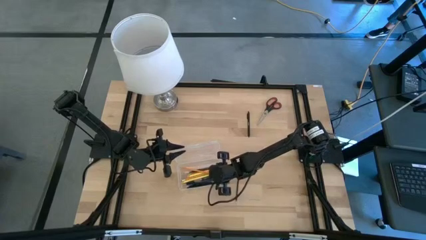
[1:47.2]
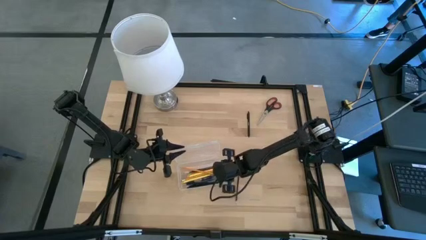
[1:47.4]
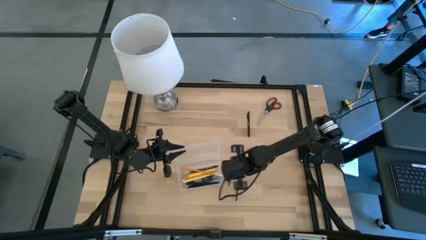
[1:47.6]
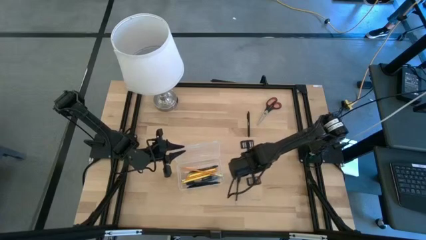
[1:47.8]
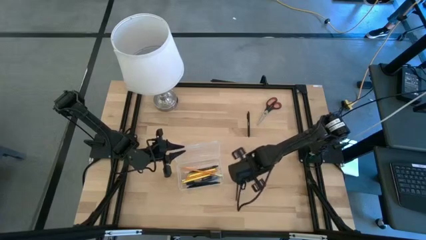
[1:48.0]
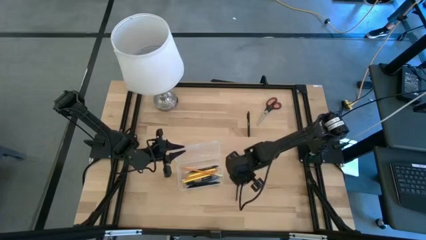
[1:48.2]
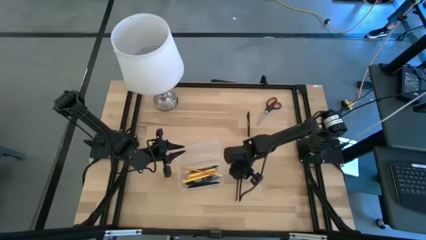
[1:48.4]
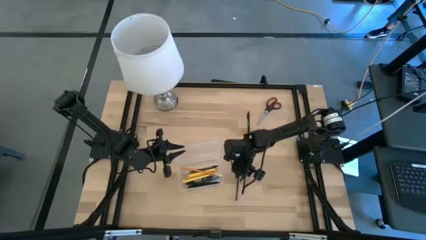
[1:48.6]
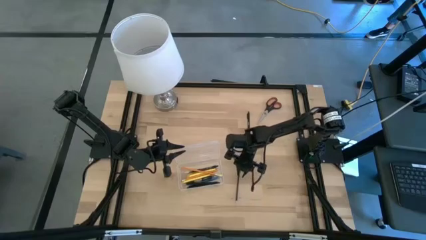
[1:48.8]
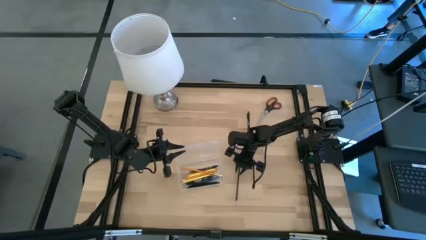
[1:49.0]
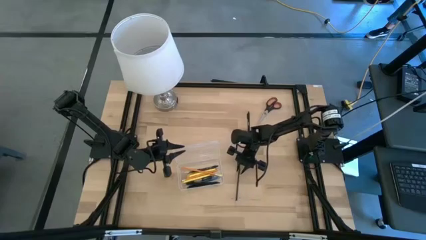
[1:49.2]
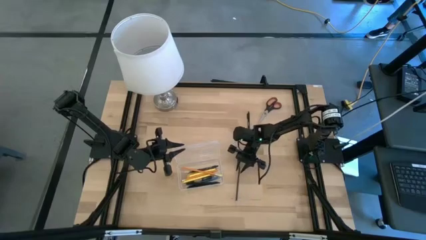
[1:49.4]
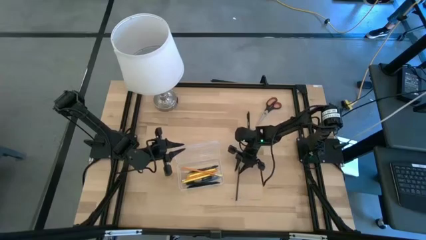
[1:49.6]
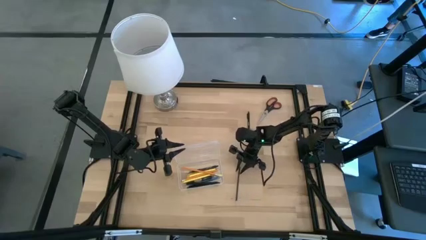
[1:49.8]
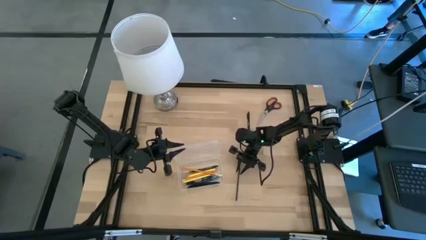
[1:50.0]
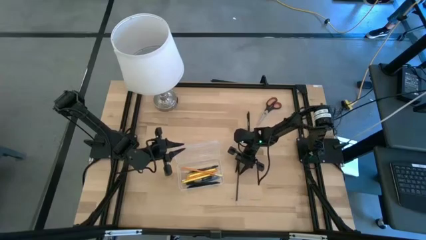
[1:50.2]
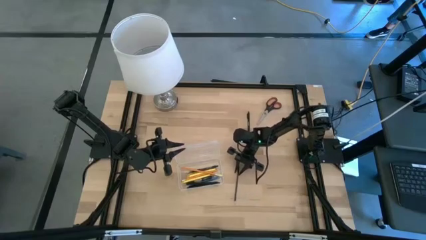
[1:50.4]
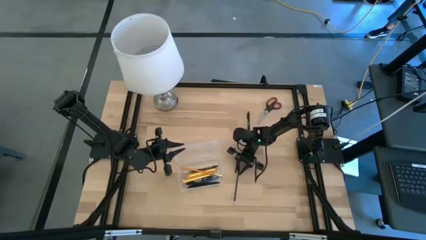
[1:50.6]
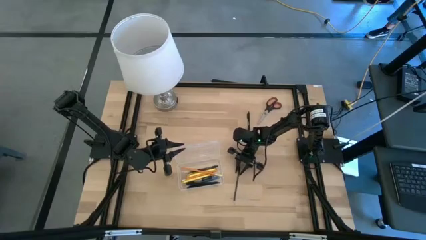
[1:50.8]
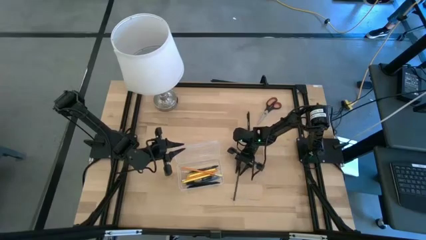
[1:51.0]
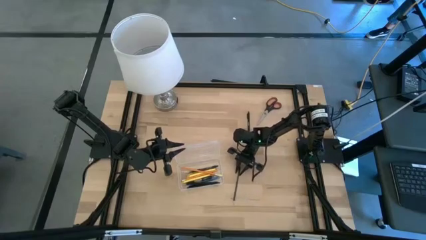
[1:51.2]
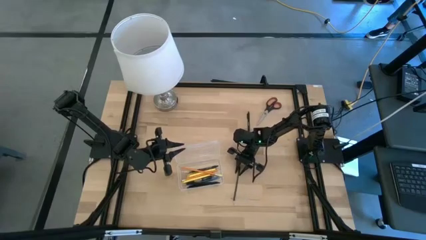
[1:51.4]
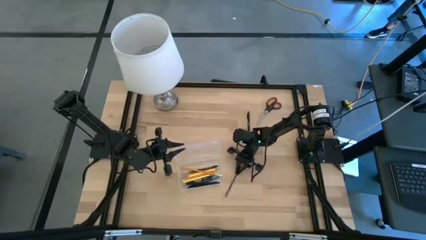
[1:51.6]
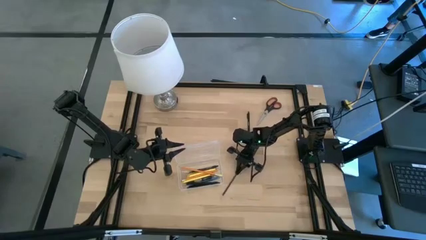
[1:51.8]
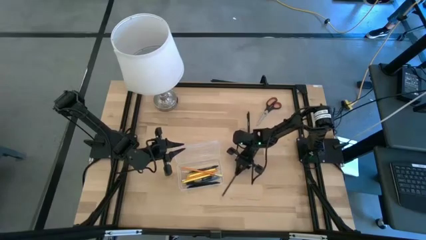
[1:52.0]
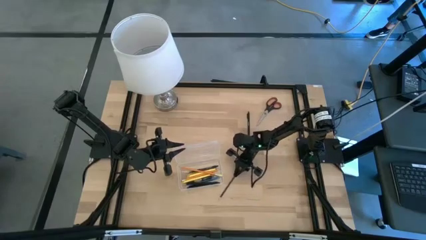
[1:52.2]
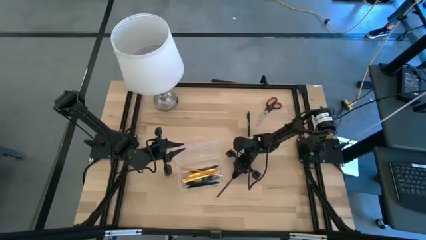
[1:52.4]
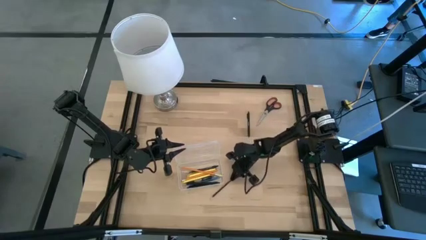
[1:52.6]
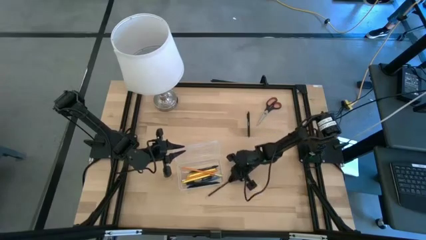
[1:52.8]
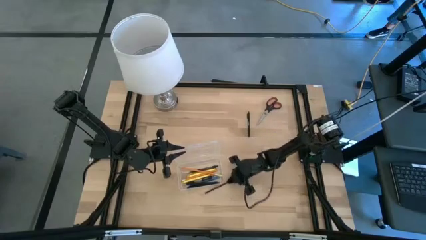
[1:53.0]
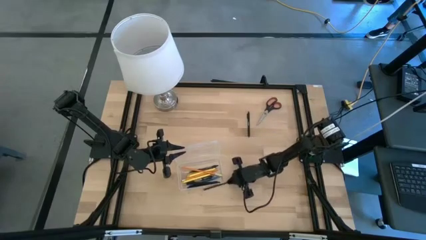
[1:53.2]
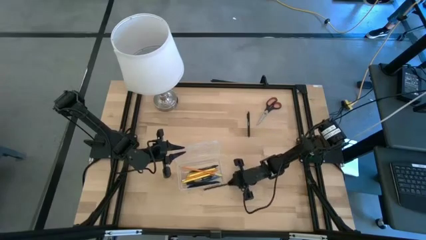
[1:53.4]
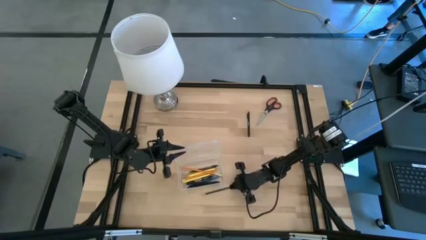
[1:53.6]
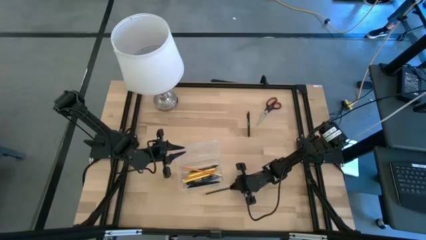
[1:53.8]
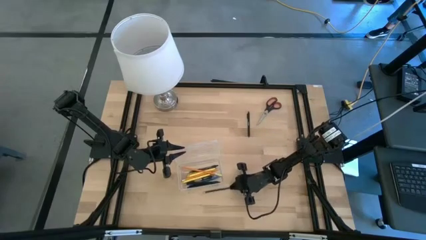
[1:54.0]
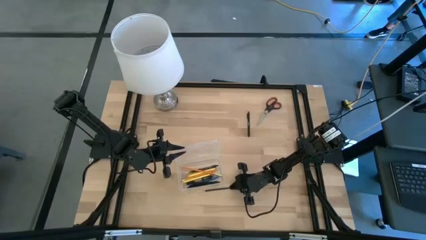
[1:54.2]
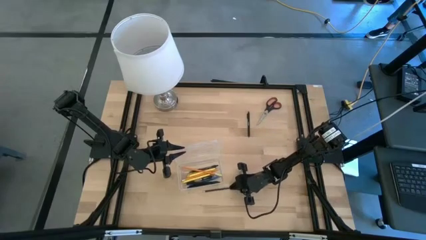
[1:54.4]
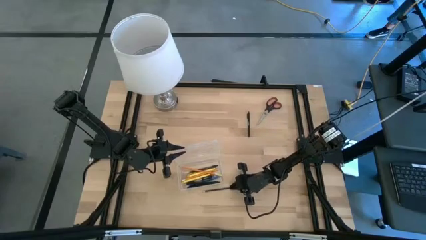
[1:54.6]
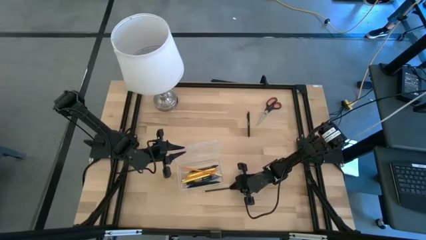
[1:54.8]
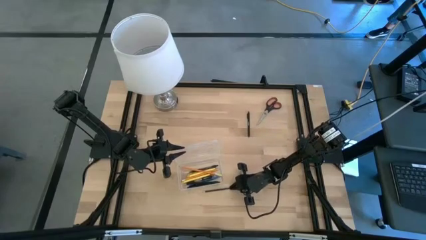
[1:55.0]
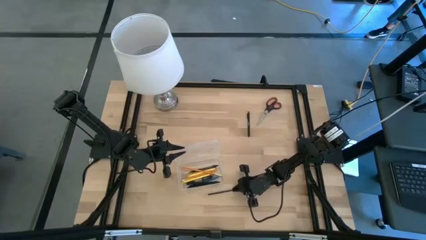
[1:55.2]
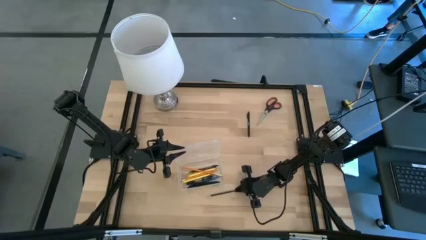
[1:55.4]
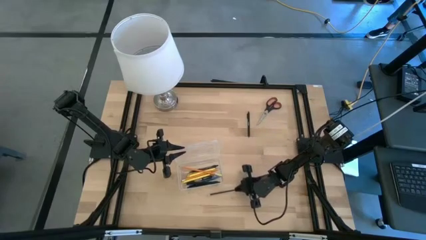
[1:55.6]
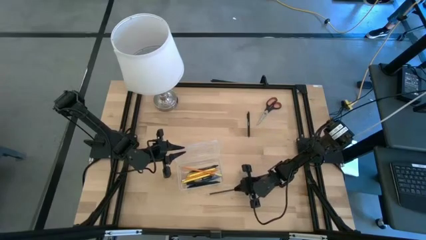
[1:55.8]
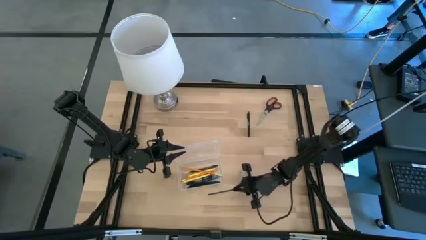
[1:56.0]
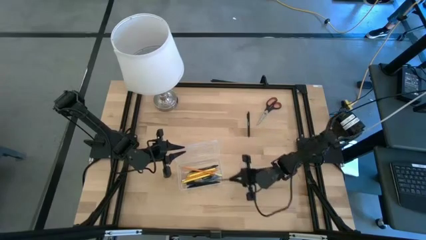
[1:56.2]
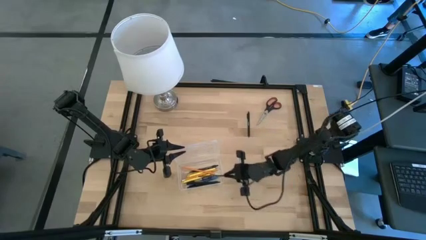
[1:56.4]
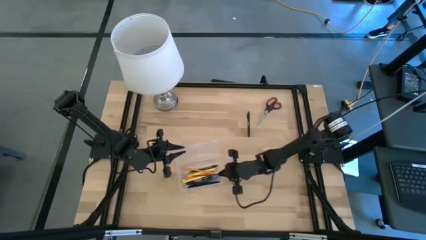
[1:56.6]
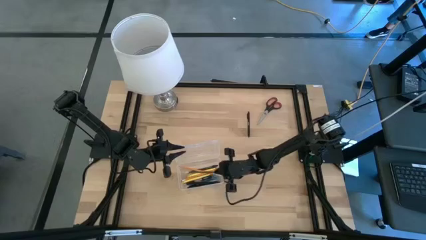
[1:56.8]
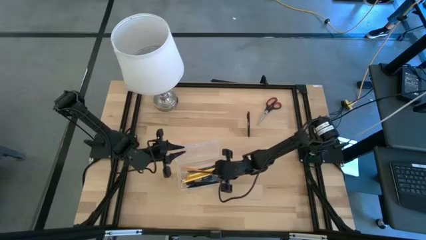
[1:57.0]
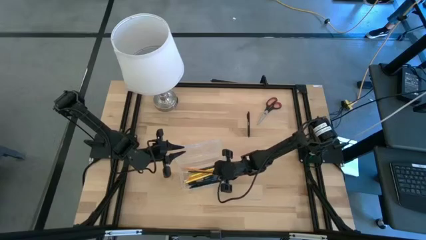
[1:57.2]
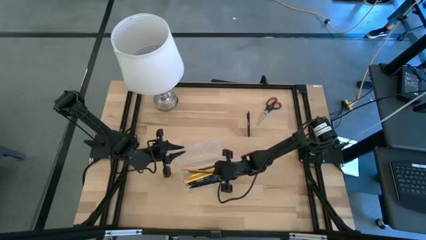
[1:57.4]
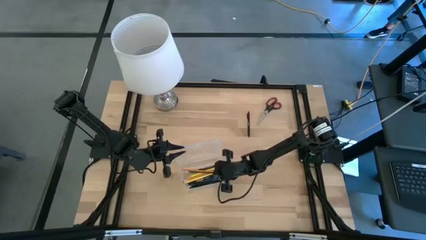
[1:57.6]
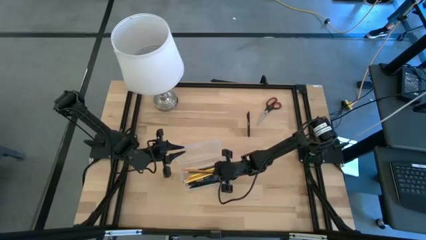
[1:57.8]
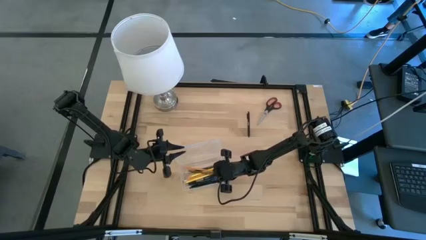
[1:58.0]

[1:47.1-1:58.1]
Task: Pick & place school supplies into a supply box
Put the black pencil into the transparent supply box

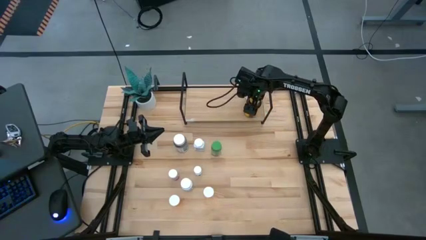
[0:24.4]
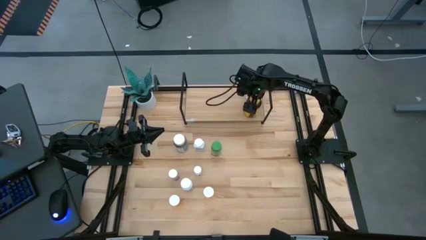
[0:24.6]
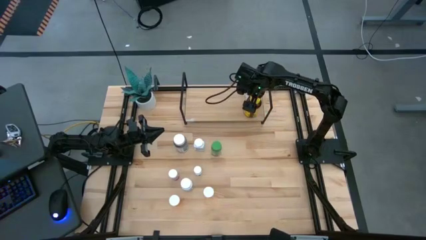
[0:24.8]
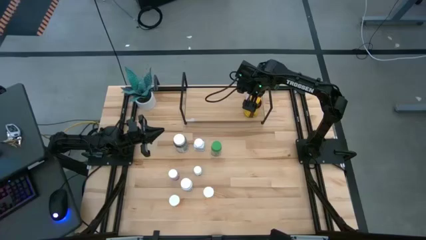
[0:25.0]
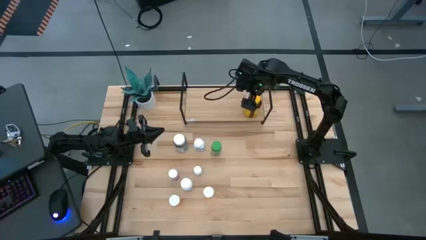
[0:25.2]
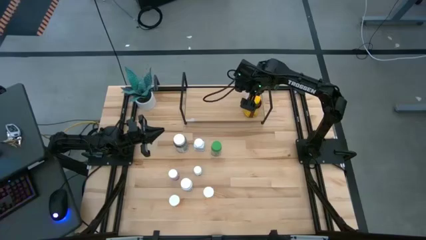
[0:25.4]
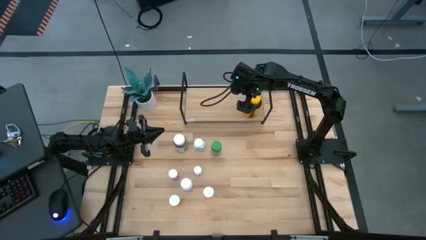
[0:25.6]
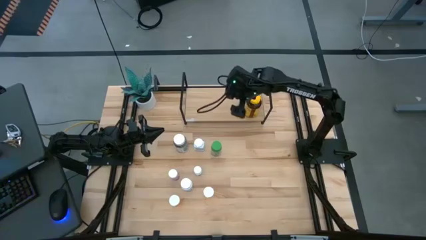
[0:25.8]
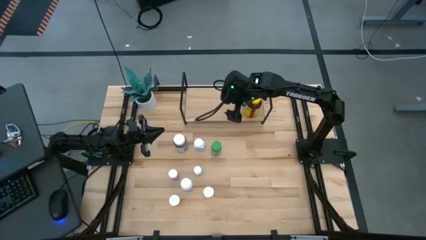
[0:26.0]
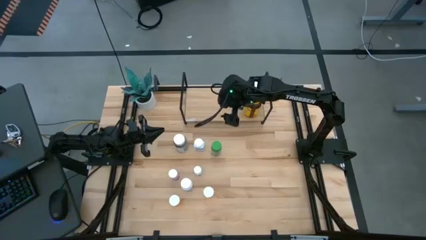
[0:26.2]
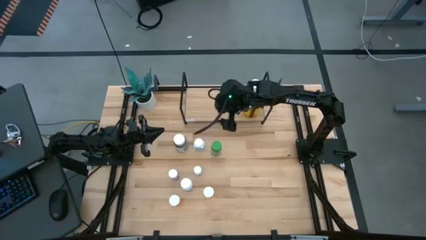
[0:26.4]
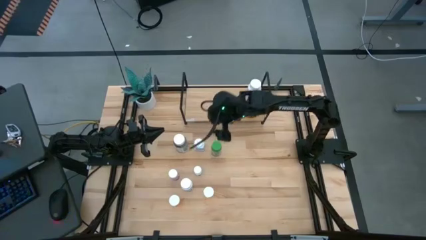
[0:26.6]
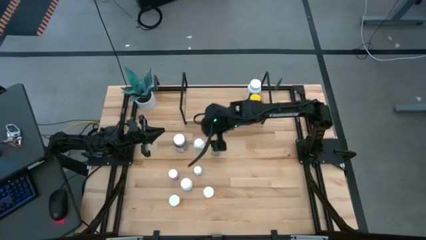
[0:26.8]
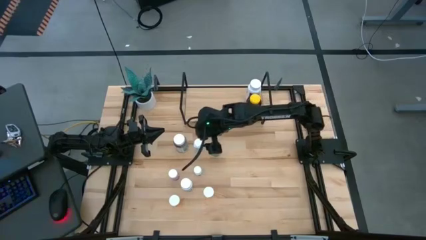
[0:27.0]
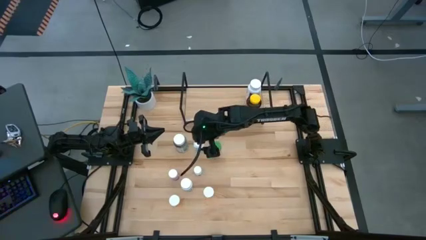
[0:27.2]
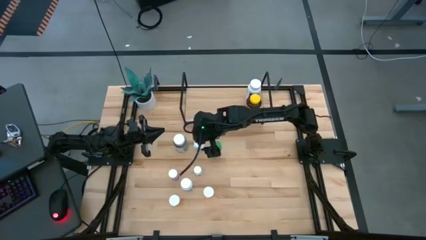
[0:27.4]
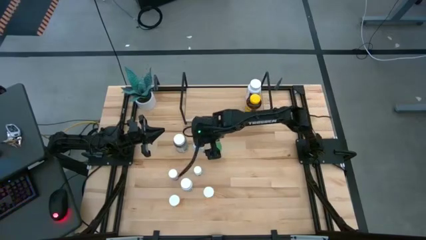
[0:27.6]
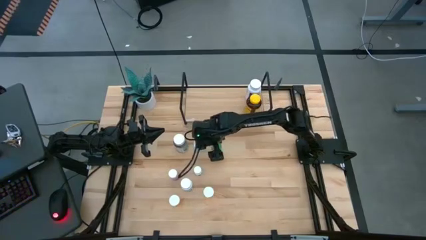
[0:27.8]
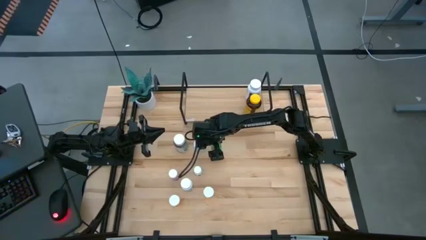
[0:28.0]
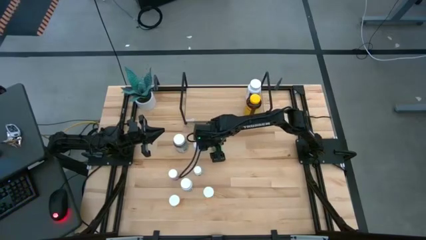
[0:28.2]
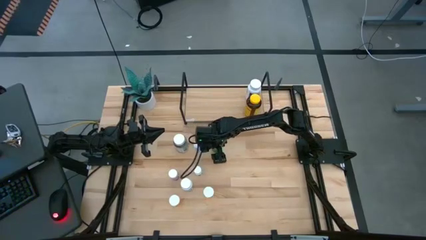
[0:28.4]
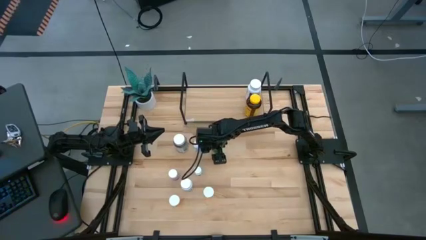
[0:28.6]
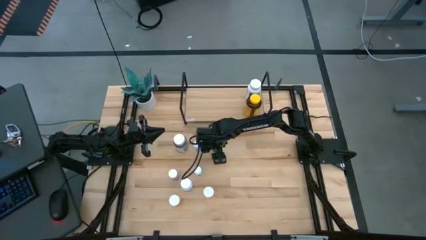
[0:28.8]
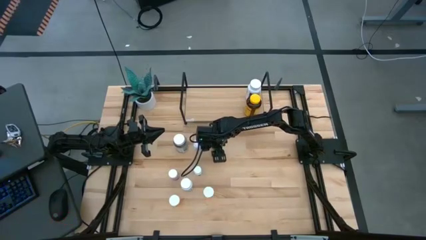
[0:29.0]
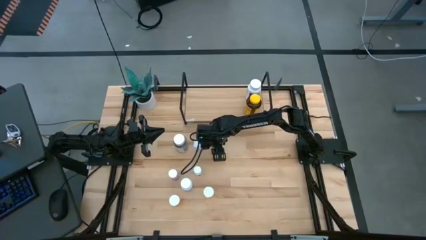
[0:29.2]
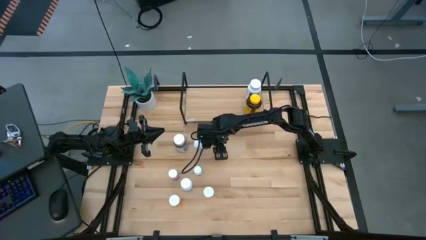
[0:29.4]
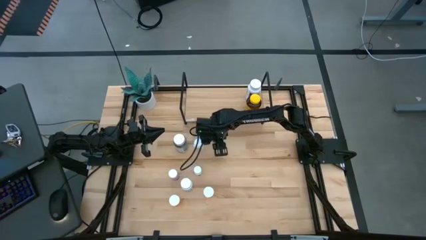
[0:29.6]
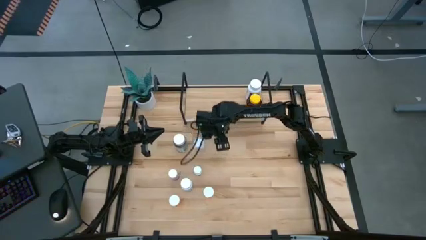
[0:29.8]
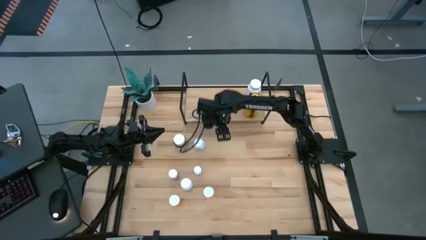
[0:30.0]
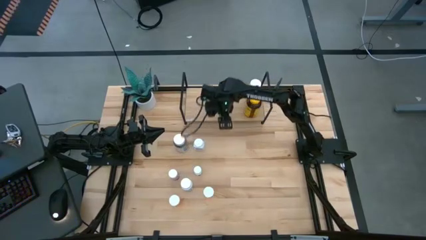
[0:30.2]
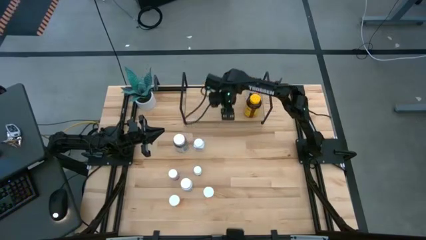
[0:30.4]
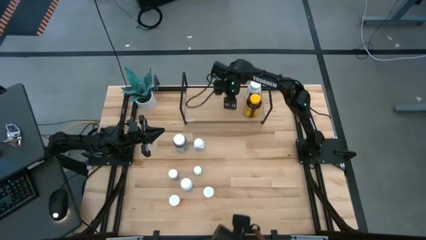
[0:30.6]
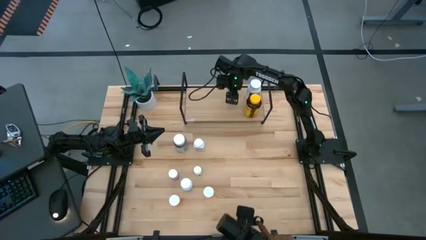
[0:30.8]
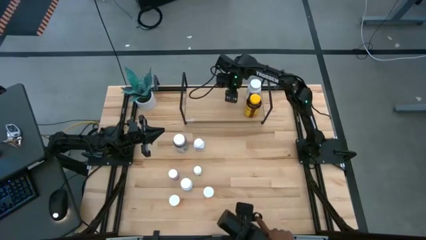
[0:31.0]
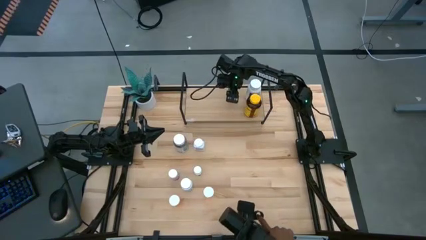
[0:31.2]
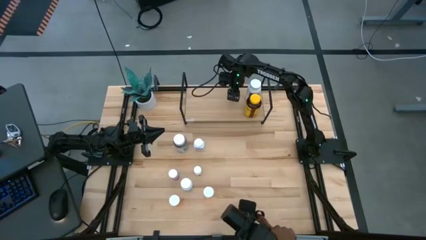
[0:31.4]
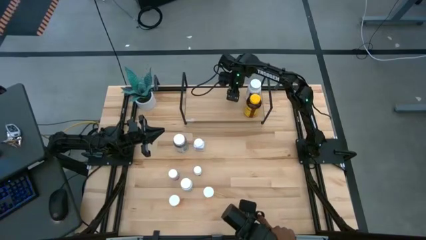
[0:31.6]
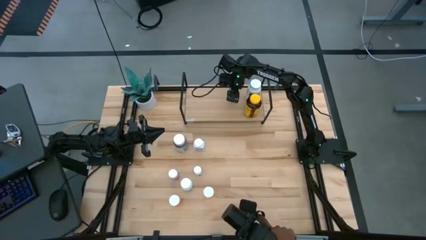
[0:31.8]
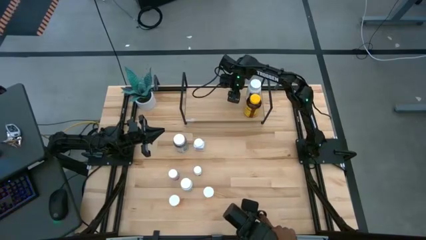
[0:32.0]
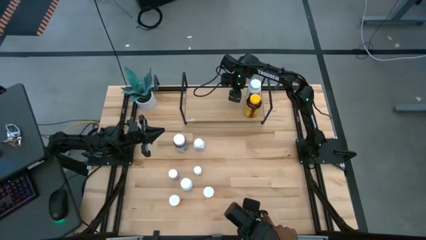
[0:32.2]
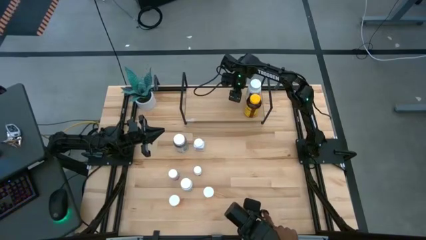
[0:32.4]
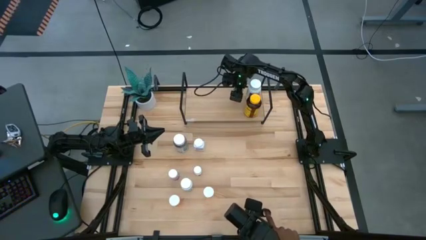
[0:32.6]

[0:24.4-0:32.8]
Task: Pick and place medicine bottles onto shelf by color
Put the green medicine bottle on the shelf
